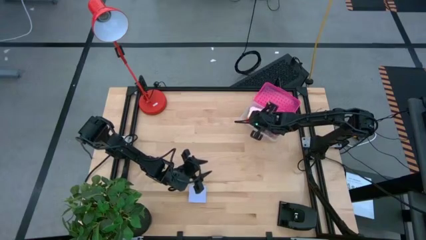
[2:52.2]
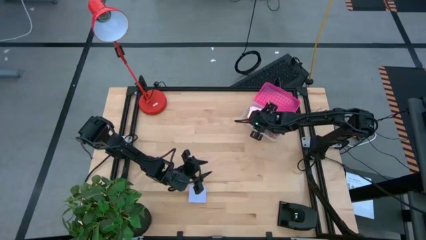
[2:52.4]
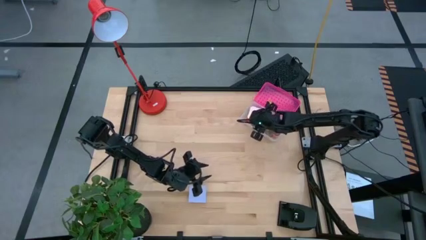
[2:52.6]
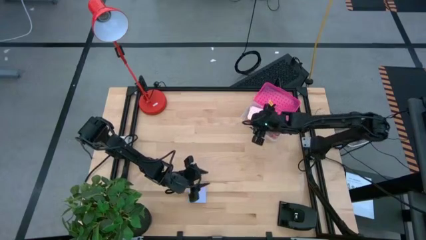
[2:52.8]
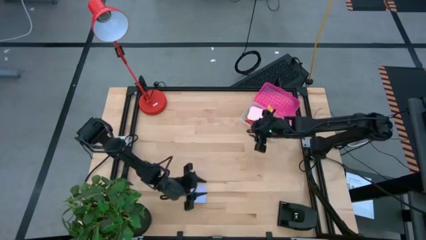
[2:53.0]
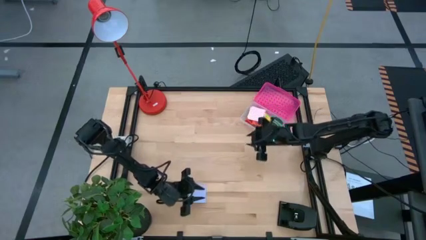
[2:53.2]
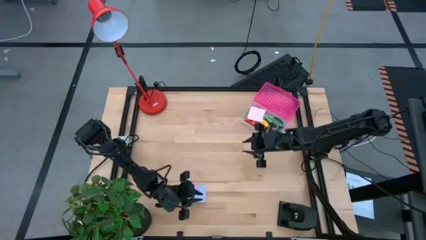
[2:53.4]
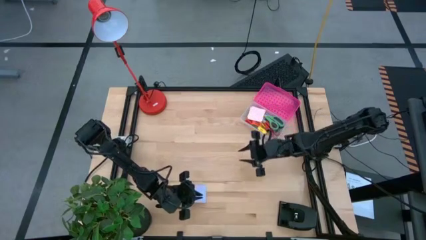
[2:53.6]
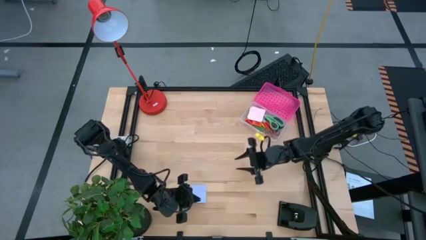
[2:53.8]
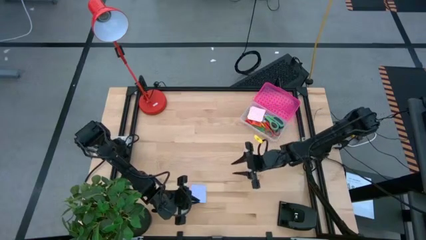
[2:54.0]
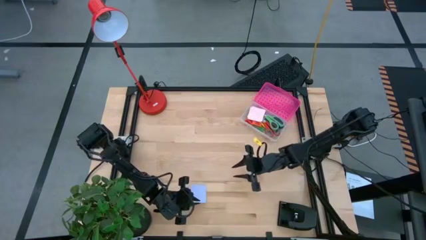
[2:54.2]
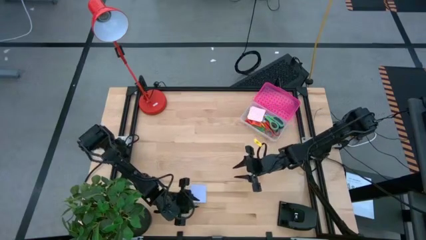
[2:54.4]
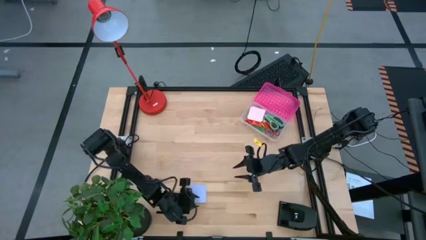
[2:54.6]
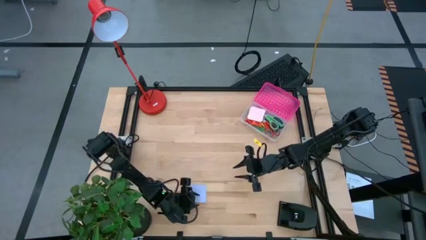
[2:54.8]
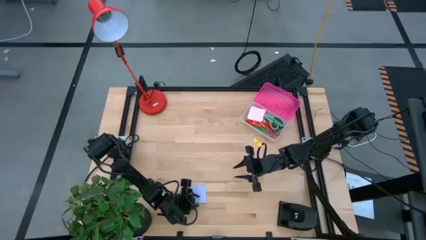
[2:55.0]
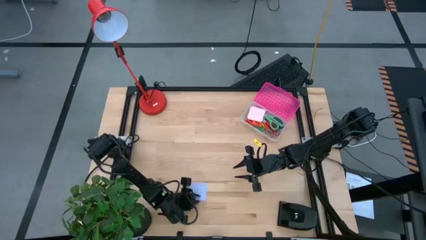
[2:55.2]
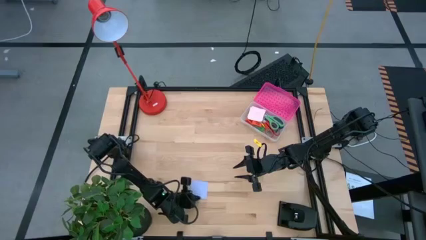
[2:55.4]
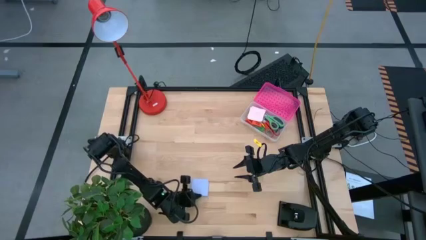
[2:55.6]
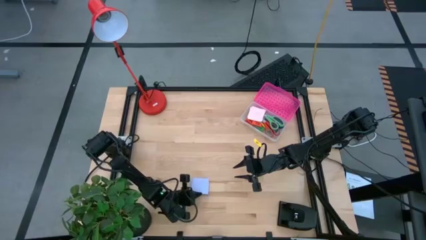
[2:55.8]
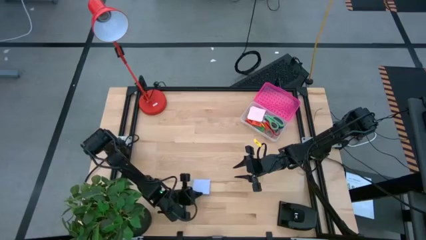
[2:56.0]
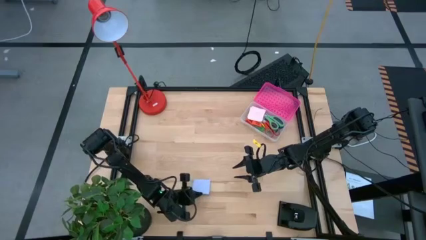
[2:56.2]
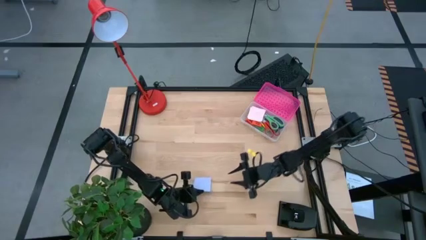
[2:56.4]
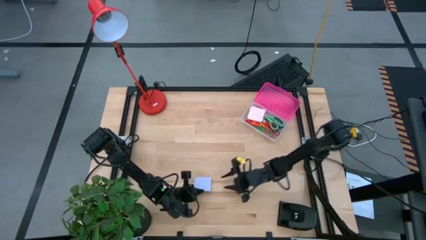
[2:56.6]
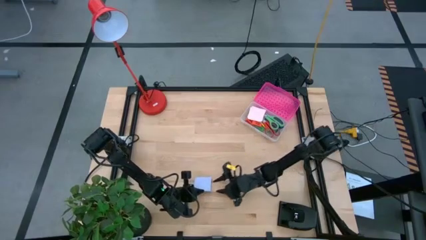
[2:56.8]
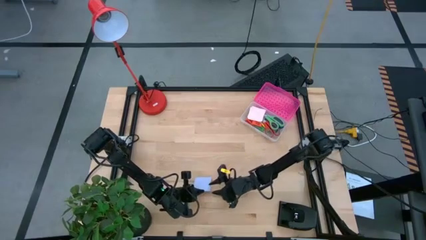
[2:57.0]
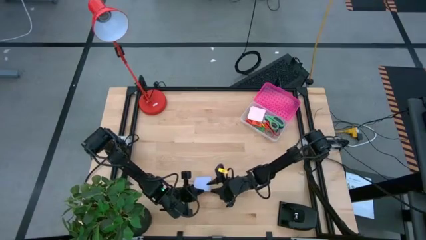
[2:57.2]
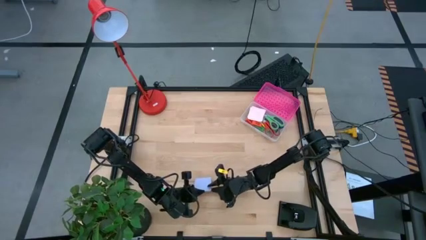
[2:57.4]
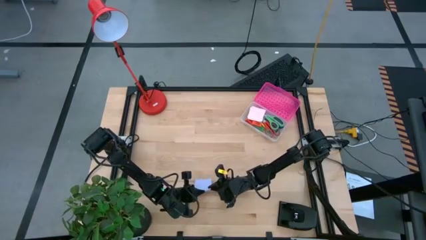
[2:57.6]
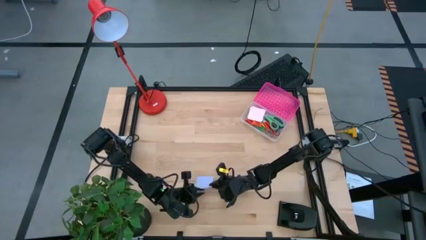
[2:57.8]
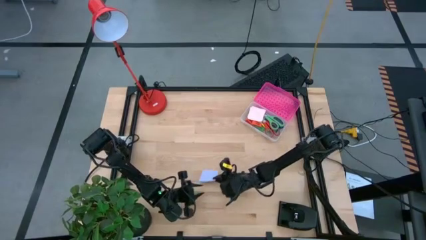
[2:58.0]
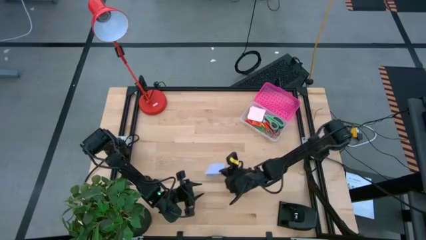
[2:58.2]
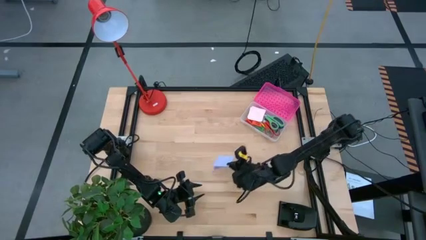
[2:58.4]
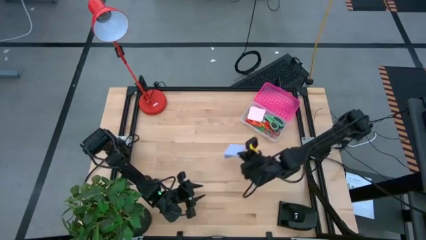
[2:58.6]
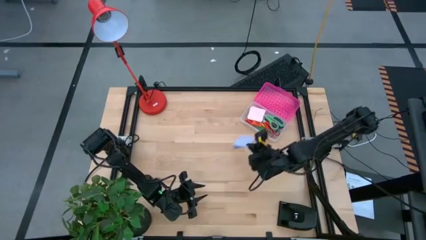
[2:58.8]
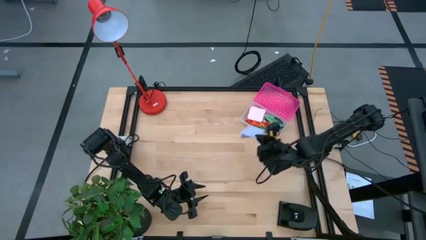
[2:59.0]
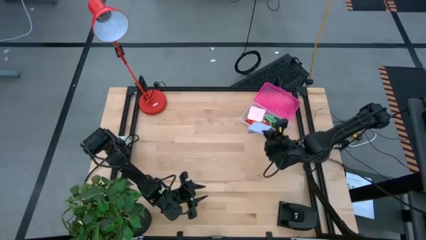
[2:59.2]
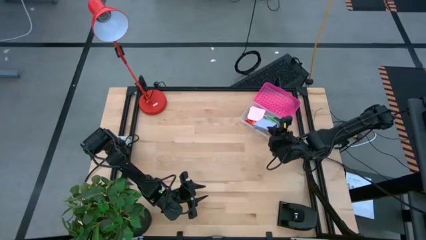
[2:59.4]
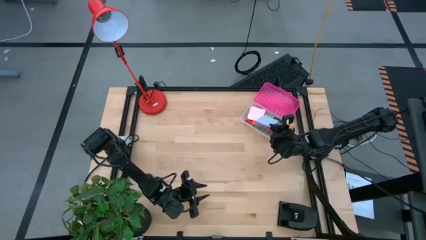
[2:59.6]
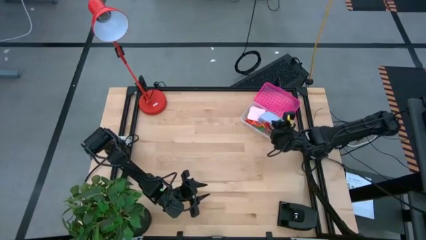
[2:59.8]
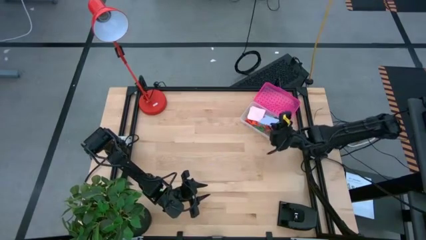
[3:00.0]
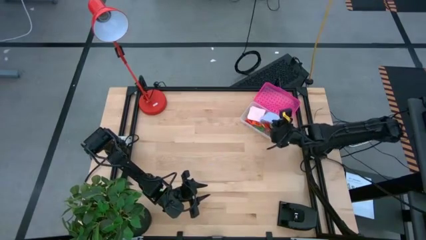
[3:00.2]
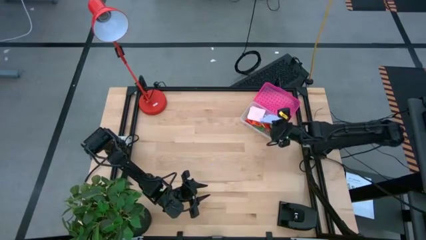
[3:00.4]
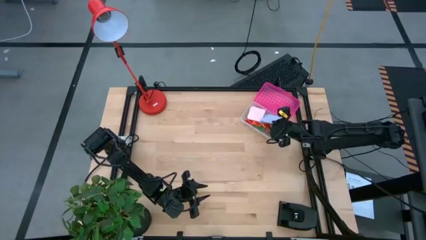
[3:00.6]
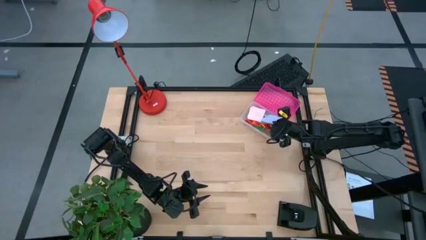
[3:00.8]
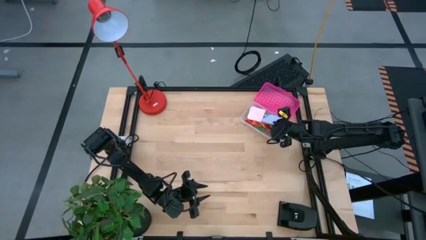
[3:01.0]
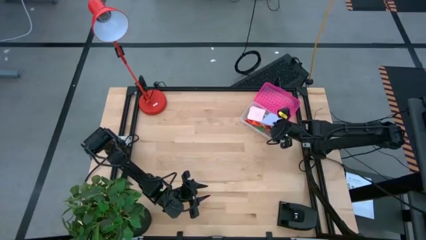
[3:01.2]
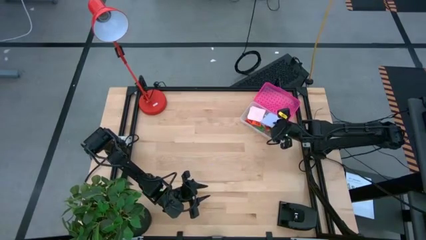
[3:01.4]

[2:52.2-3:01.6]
Task: Pack school essentials
Put the blue sticky notes into the supply box

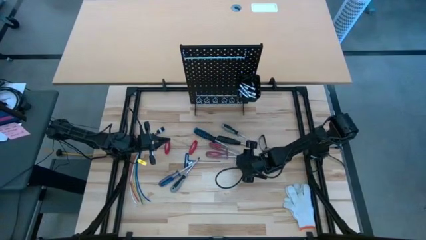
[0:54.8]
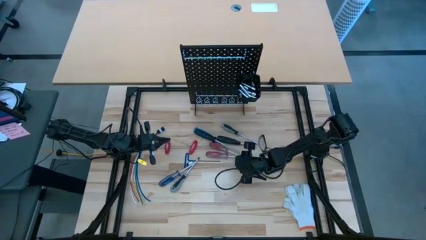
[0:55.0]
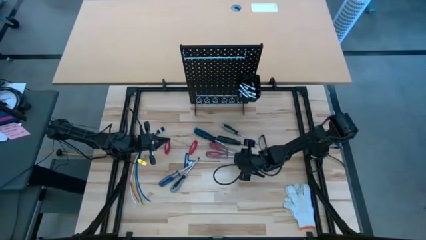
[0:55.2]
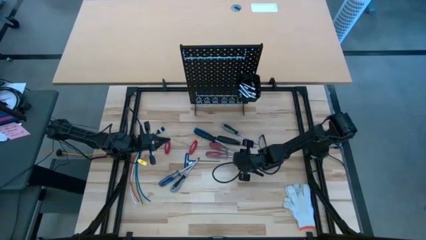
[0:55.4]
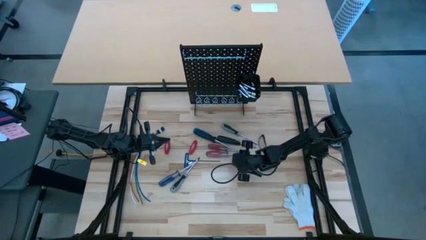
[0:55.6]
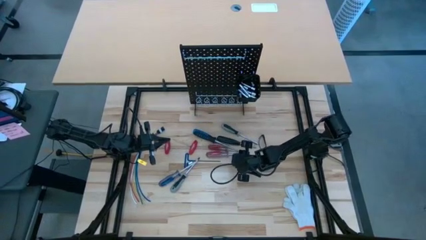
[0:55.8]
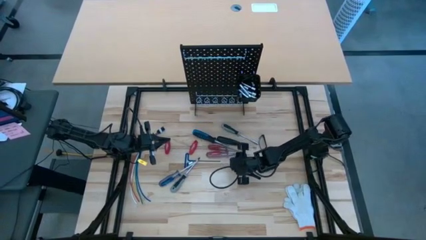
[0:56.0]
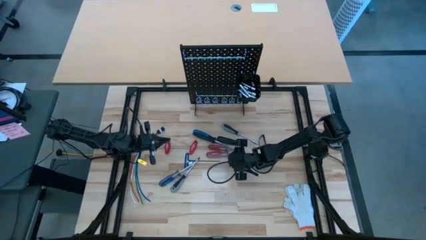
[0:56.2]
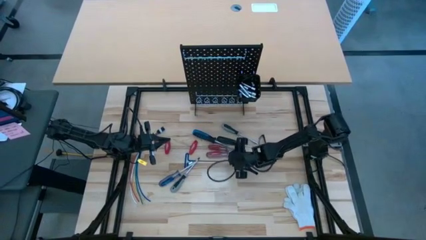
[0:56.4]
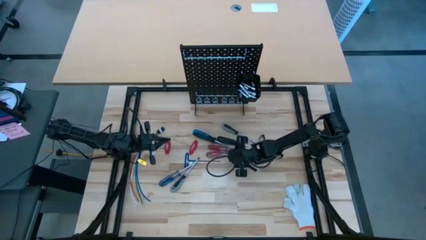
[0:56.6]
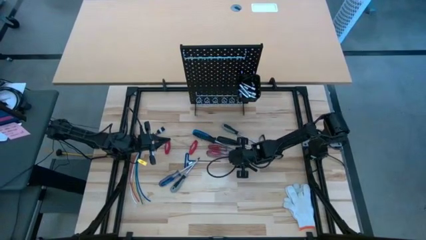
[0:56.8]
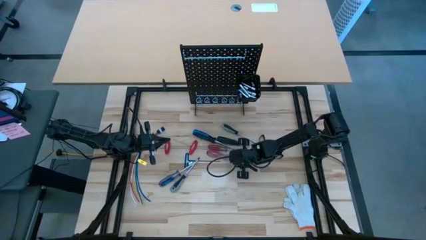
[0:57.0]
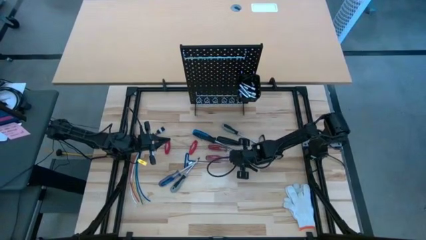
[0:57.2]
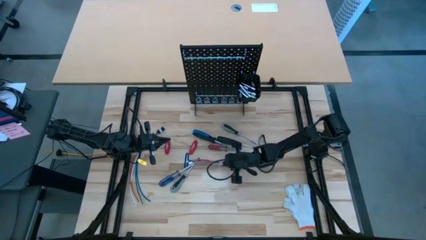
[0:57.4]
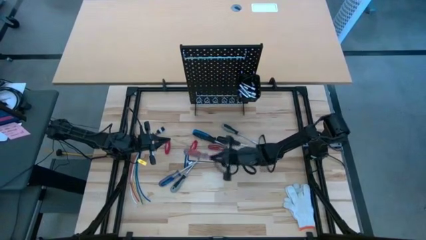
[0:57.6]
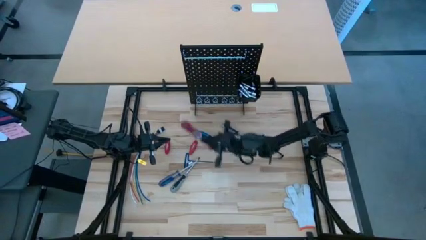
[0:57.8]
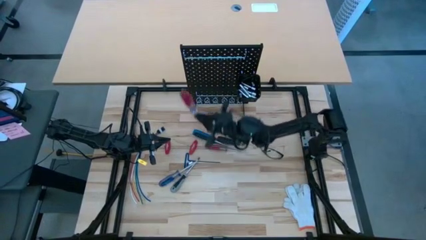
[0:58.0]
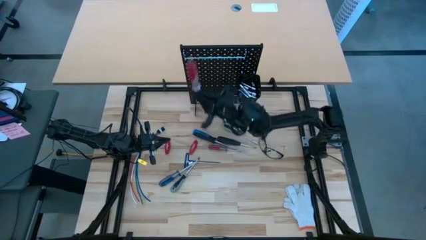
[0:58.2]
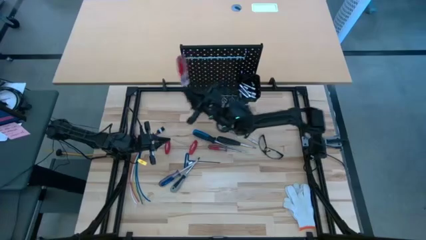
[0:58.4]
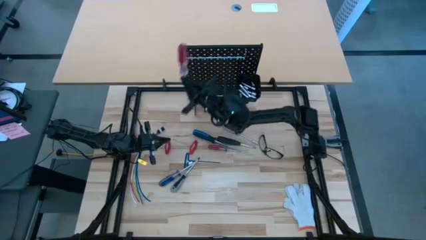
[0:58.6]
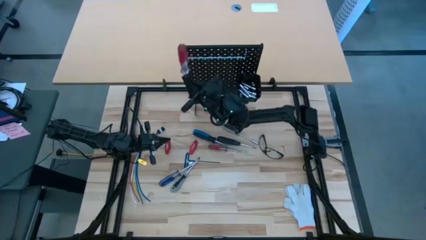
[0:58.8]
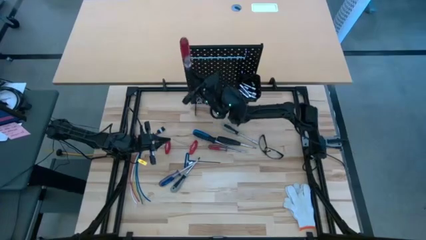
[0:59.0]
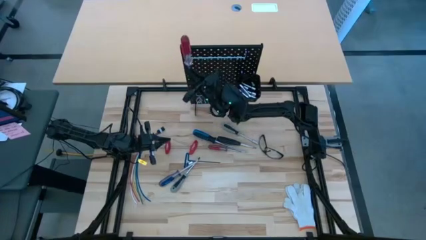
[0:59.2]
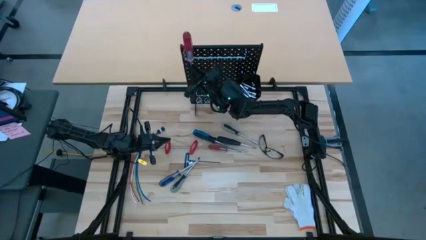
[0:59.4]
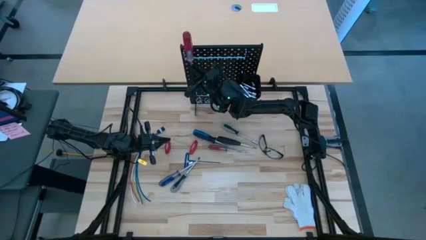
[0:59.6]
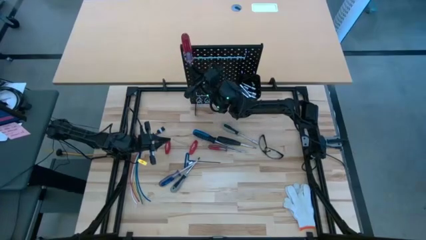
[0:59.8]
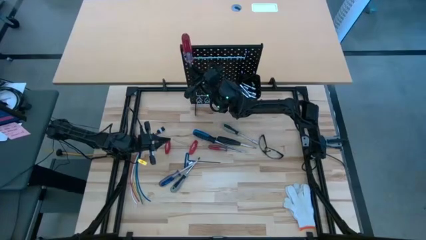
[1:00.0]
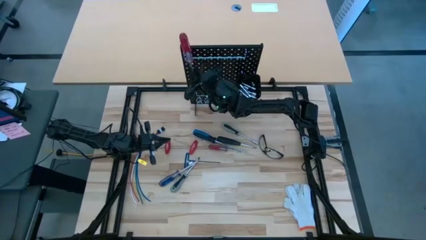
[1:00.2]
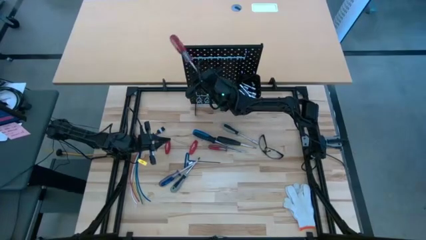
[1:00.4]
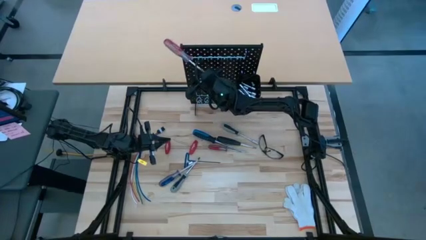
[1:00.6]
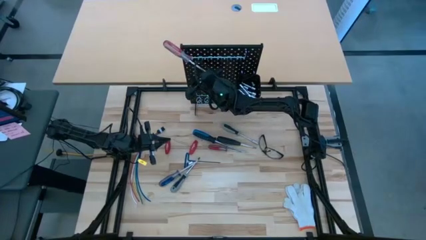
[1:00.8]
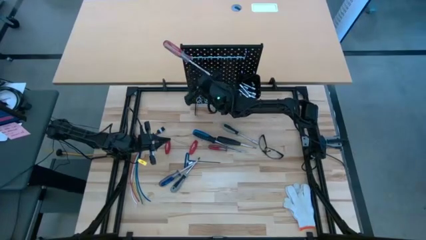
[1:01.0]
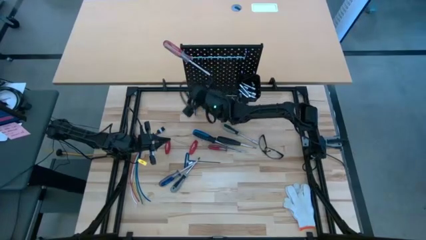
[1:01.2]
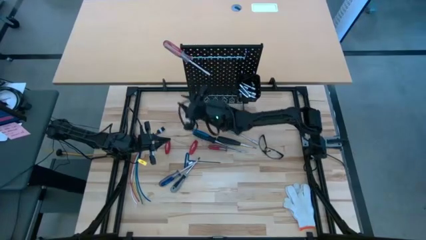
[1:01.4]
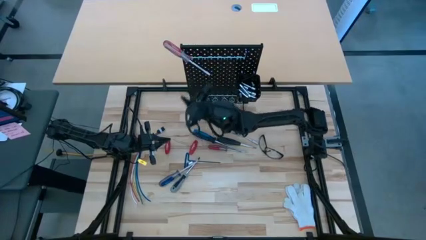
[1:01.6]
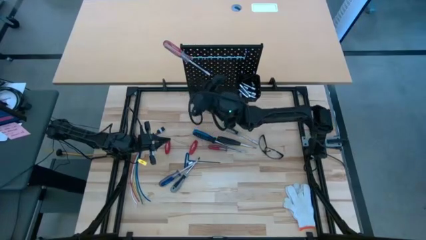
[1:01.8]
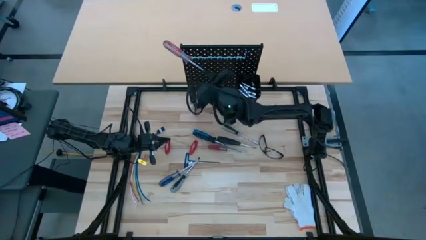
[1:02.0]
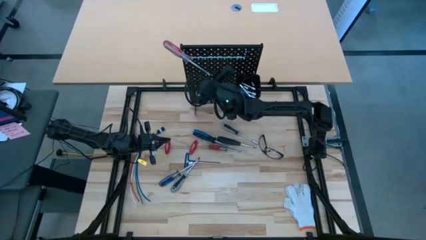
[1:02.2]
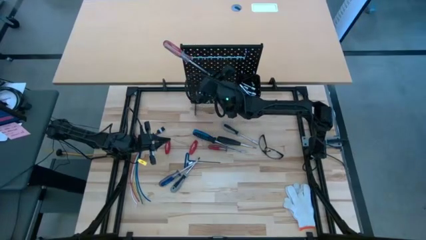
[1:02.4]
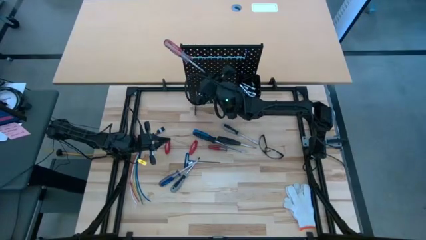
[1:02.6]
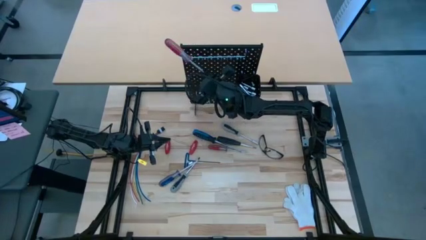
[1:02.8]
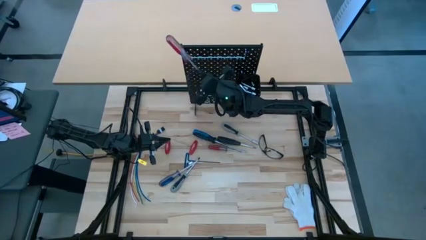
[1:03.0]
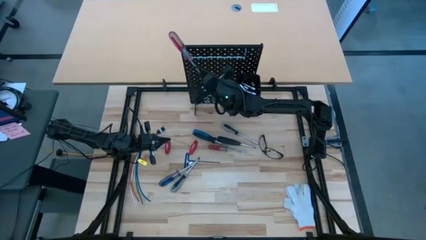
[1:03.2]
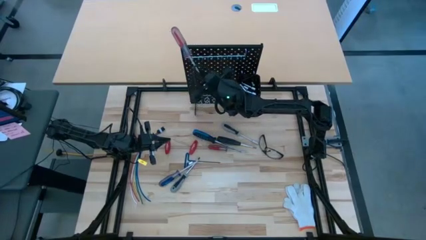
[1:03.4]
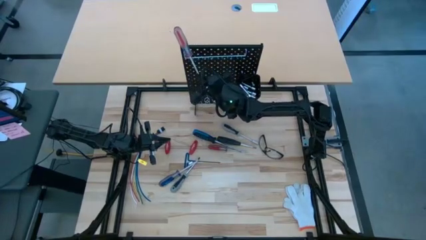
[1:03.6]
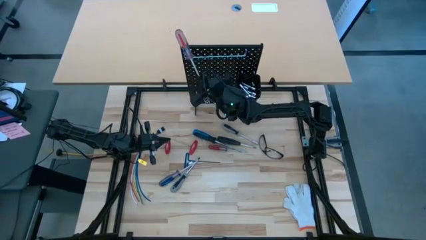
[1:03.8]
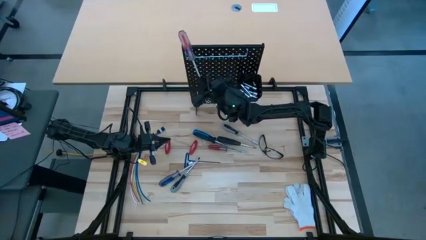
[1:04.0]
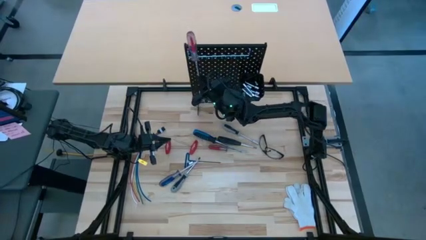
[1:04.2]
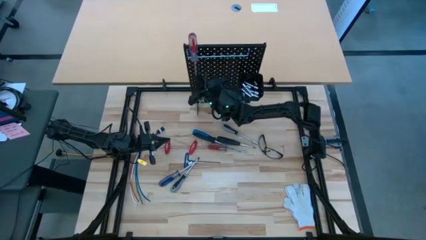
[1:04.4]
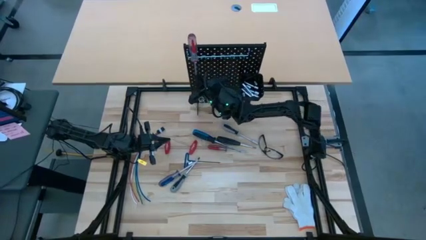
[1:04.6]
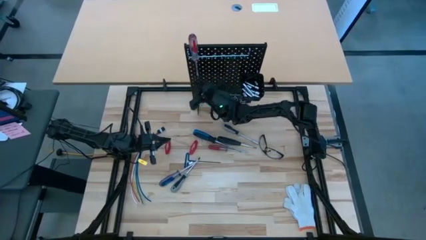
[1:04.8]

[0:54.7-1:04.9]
Task: Hang tools onto peg board
Hang the red screwdriver on the pegboard
